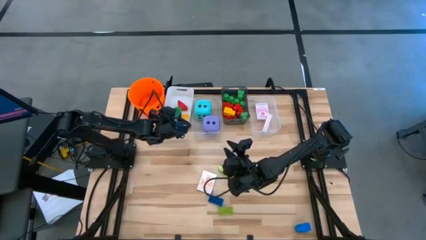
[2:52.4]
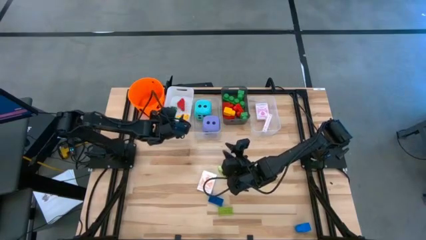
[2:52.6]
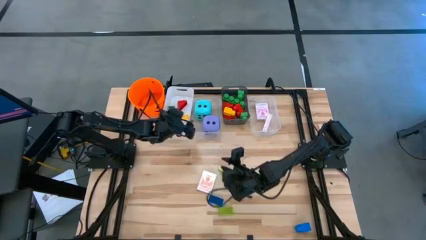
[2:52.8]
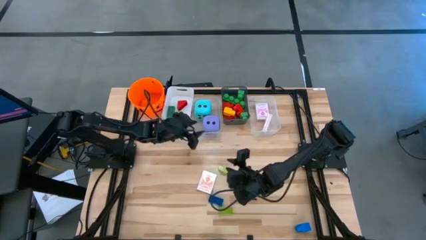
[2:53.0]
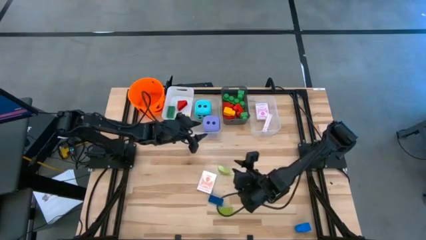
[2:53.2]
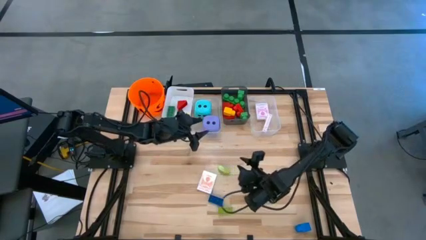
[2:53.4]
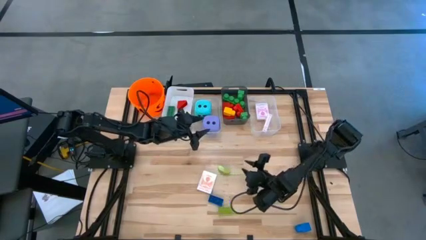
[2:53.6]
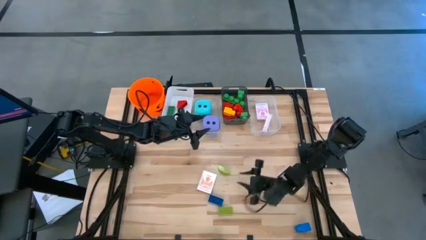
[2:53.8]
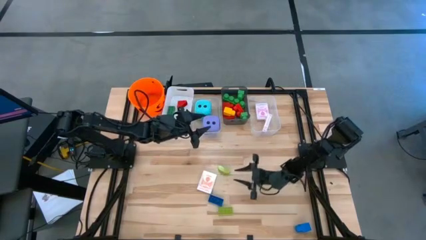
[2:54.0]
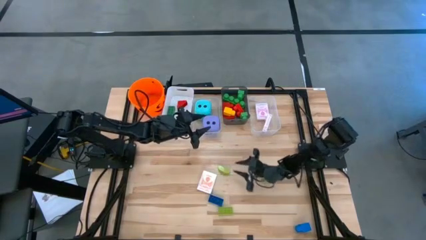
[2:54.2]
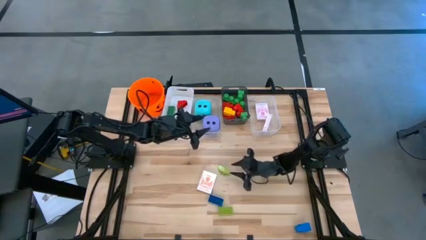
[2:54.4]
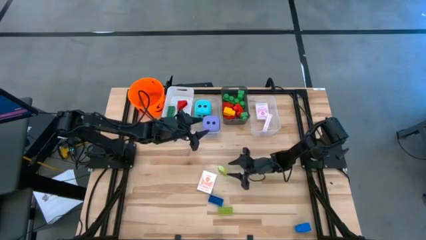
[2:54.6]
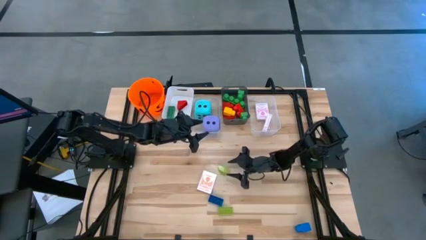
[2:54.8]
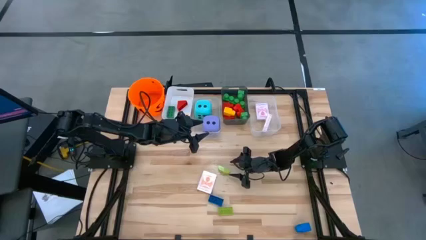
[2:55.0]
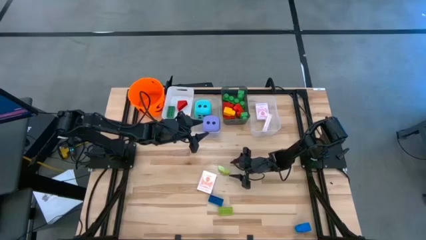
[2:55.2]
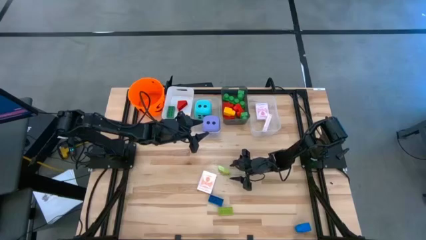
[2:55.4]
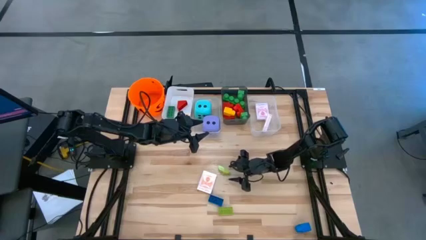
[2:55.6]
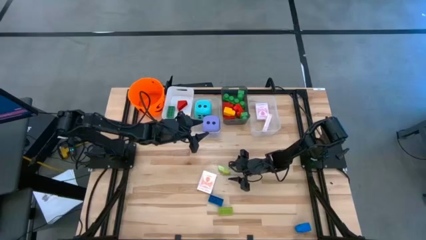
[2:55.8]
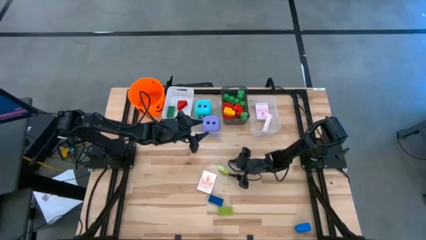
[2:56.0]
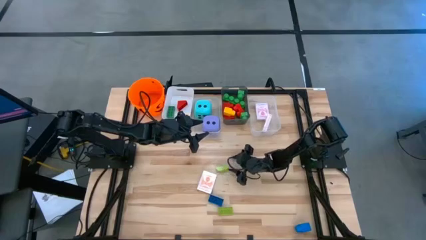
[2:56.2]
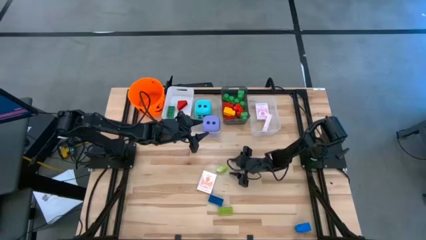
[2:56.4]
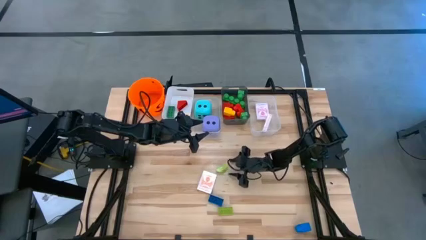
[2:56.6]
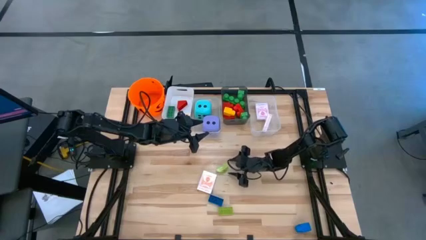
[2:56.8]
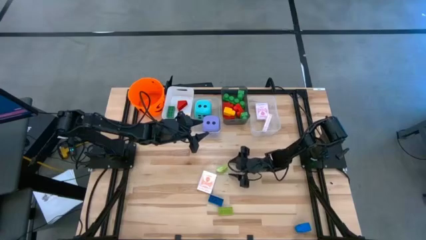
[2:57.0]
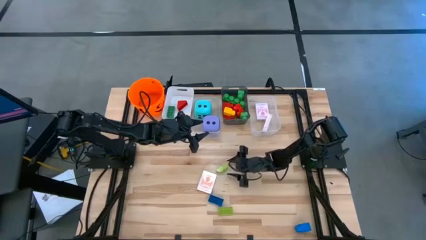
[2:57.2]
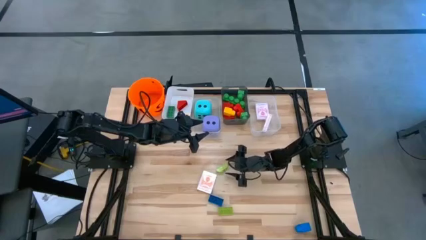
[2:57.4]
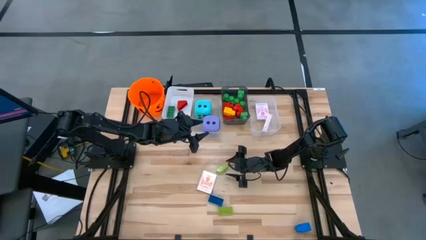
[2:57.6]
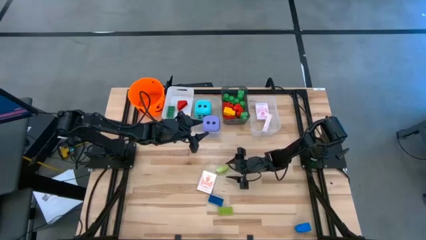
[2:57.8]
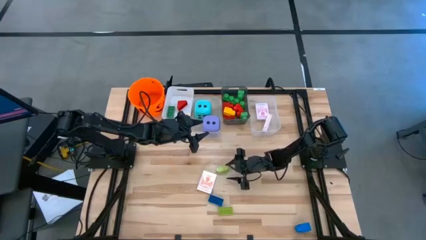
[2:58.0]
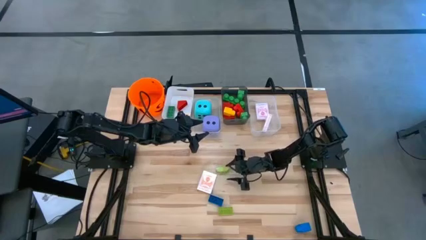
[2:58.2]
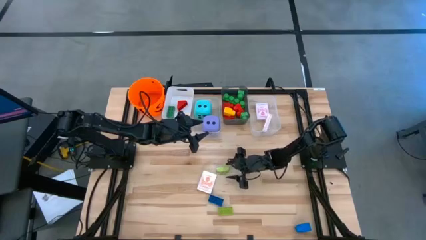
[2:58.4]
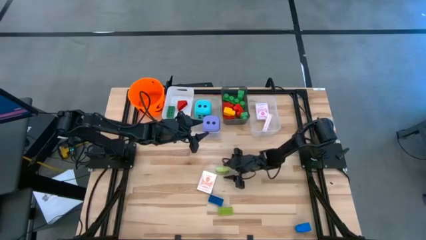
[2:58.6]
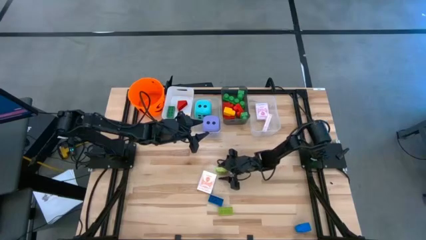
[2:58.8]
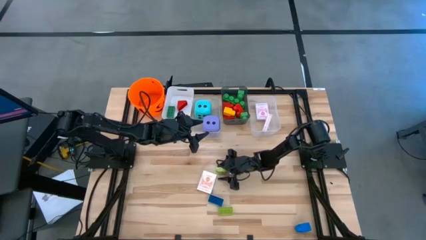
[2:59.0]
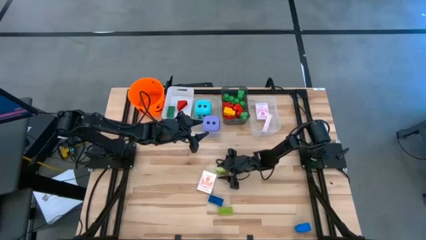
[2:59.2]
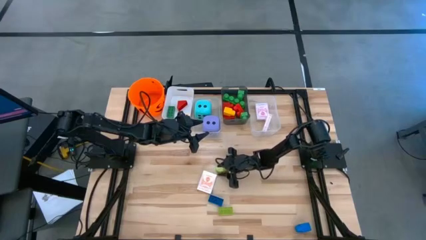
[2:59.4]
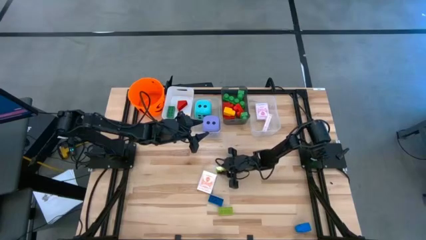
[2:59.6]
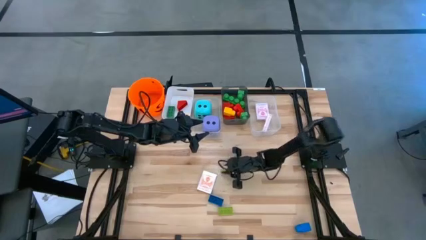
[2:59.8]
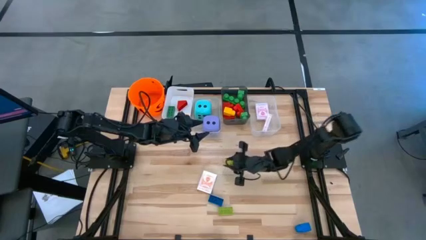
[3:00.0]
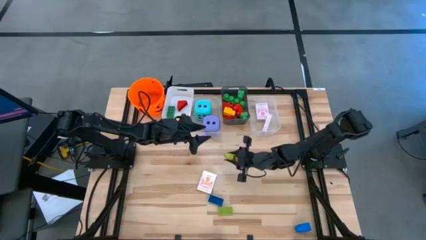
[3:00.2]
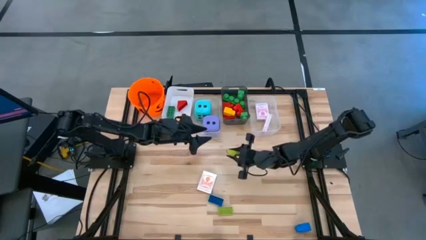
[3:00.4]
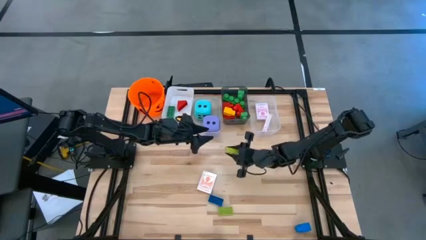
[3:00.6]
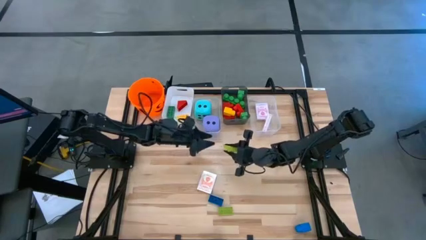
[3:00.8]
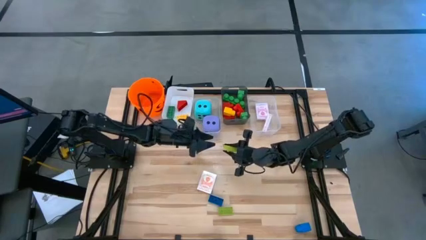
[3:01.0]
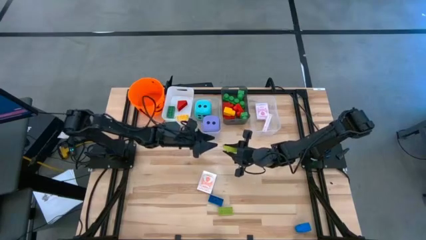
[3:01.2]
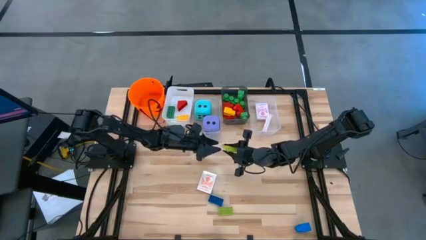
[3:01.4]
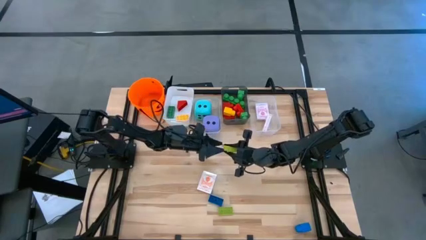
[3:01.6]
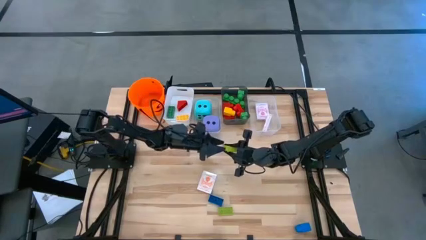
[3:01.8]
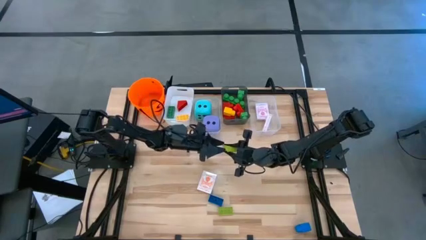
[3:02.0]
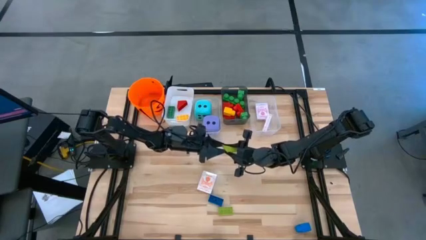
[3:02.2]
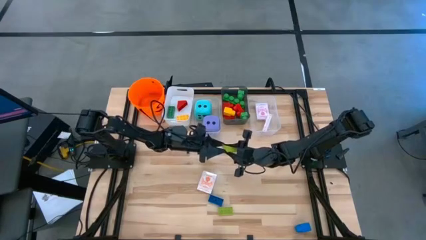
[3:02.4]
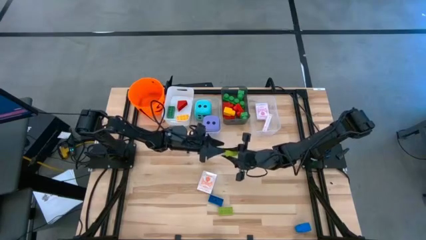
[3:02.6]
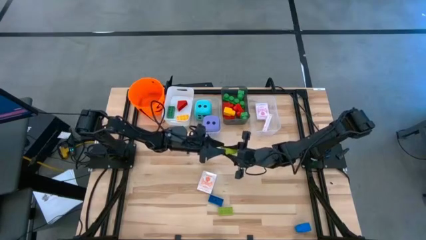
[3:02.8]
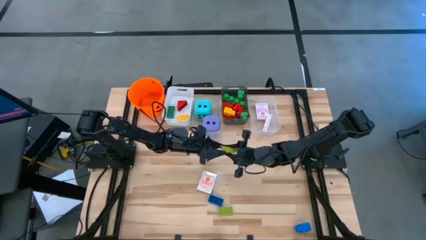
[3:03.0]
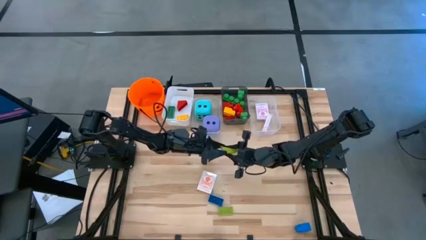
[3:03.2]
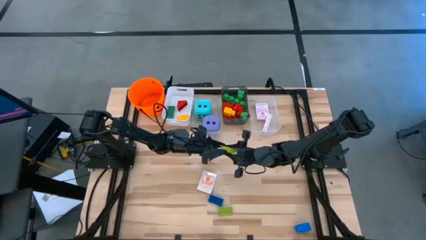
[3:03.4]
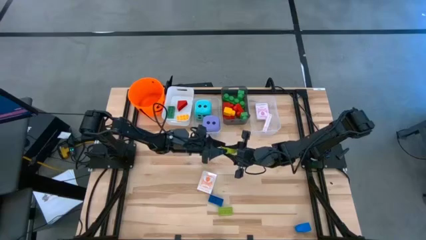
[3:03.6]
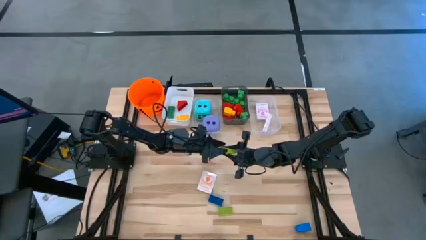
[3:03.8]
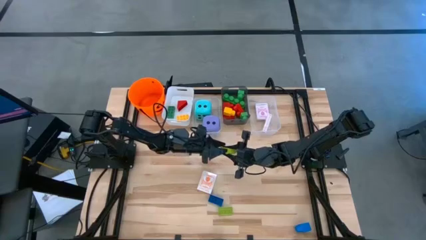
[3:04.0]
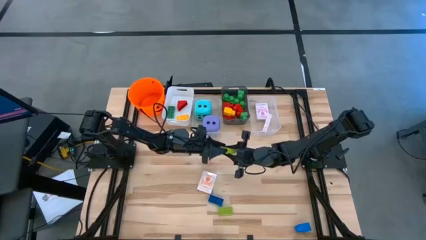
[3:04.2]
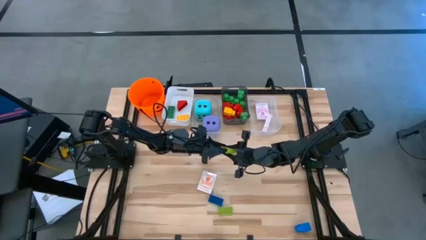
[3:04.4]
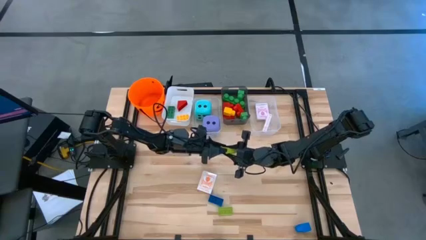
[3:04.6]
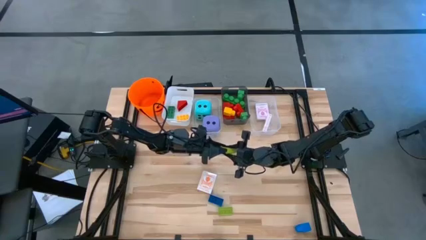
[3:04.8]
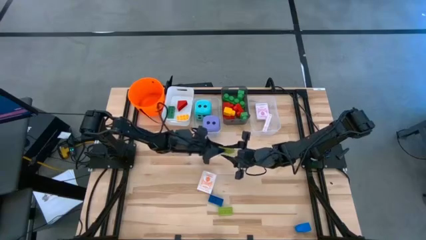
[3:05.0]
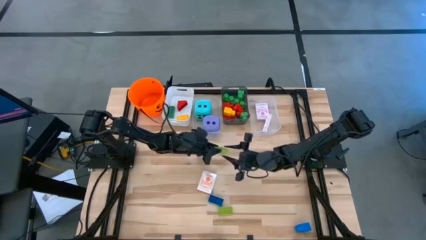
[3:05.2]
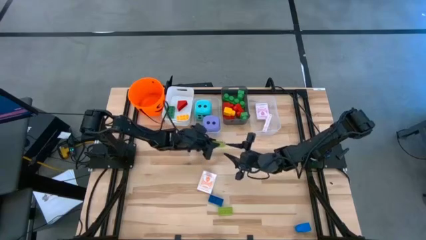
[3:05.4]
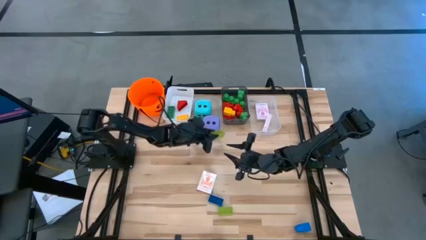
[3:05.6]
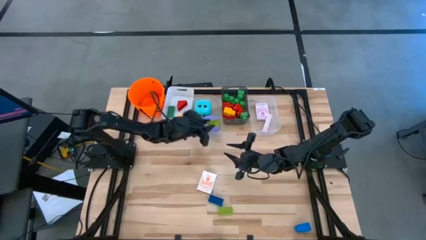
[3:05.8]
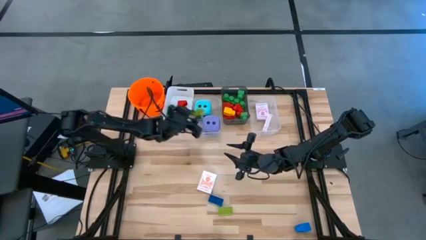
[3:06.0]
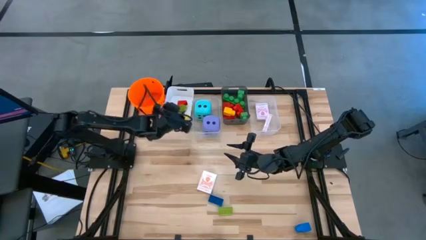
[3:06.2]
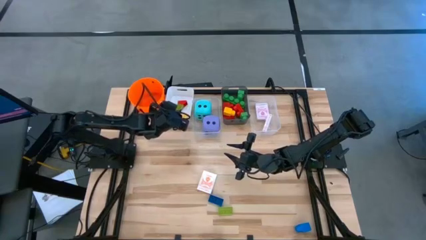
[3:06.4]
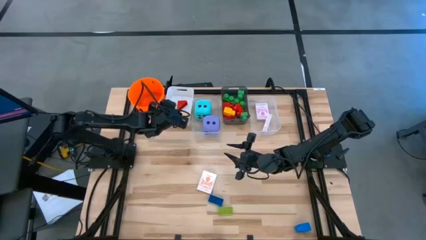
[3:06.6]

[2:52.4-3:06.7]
Task: Pick & Place Toys
Put the small top light green game piece into the white bin

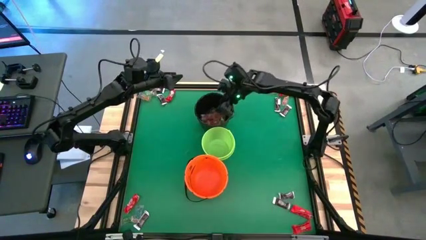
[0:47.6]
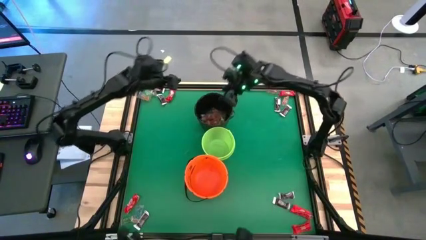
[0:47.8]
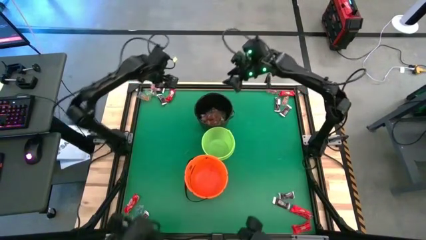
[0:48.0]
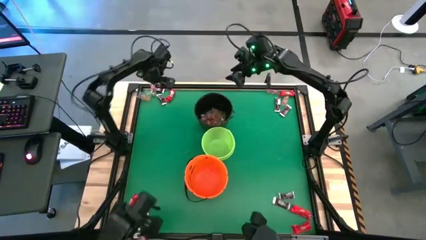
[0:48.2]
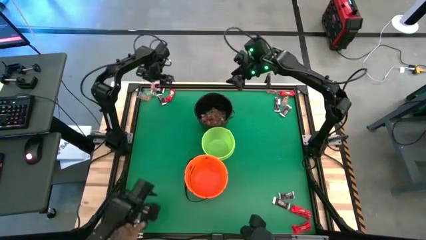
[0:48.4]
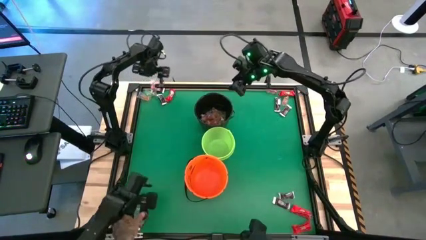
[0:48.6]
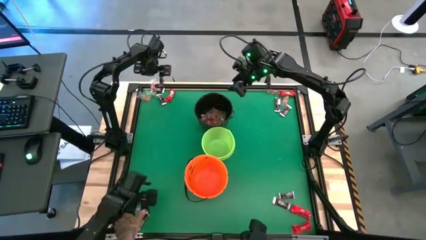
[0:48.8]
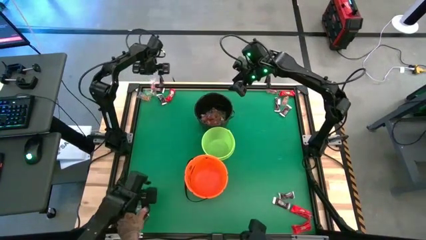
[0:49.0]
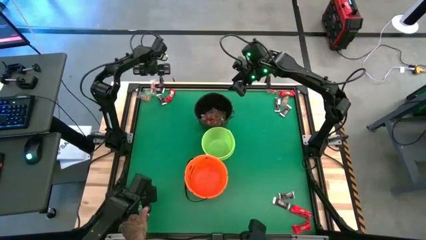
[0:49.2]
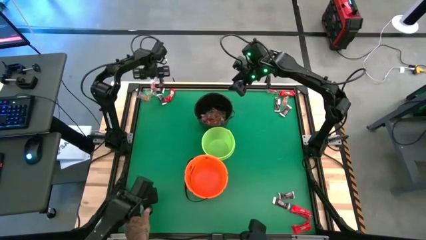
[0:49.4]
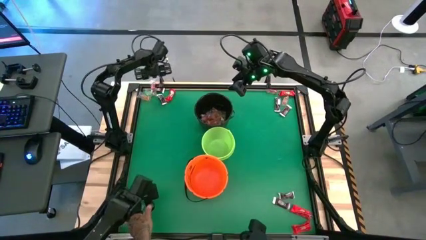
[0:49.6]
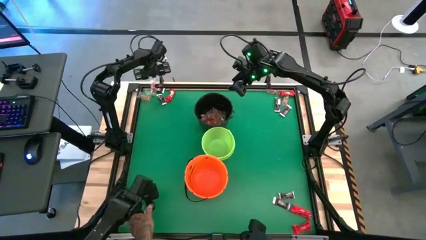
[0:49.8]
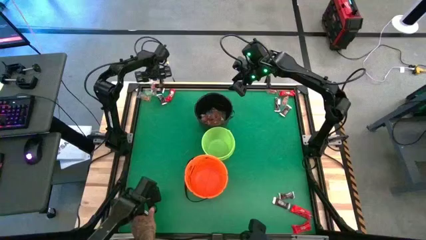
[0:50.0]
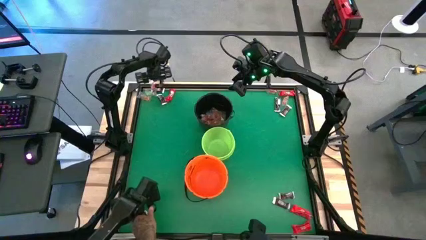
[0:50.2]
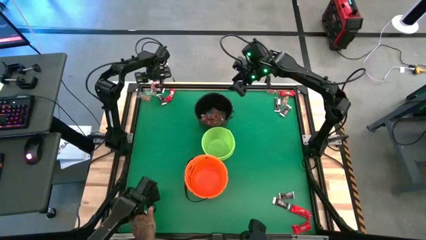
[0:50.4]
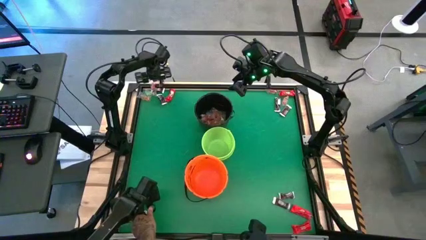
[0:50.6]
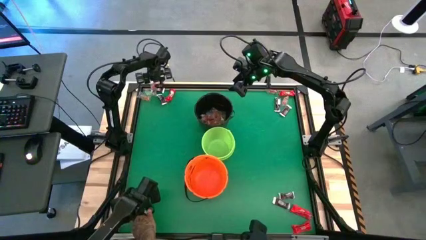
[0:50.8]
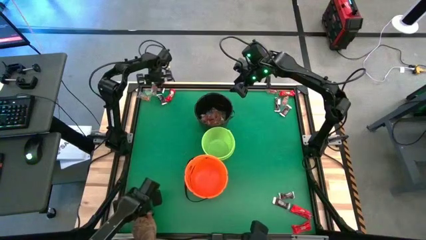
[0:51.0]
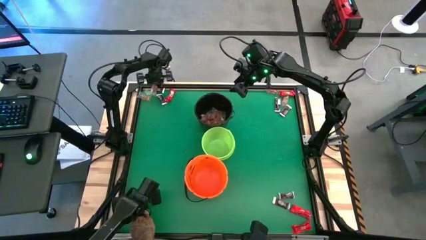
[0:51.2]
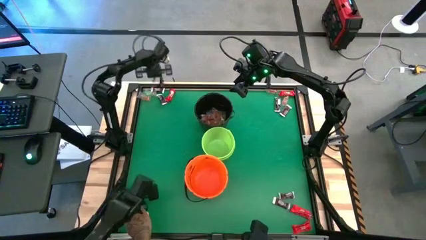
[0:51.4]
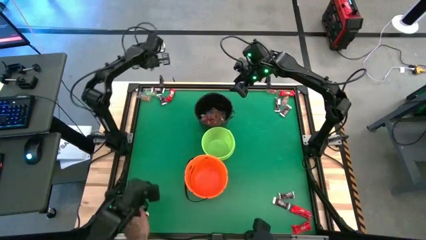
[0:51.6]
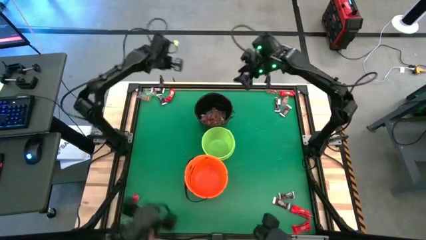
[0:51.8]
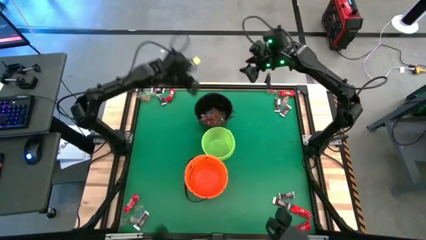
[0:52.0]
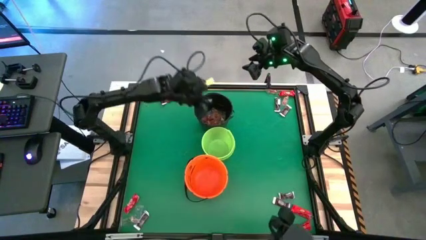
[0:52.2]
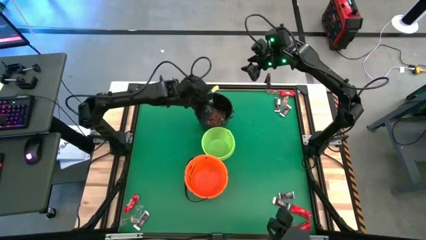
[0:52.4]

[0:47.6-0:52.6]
Task: Sort candy by brand, put in halloween buckets
Put the red gummy into the black bucket
